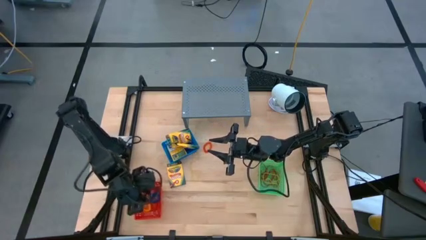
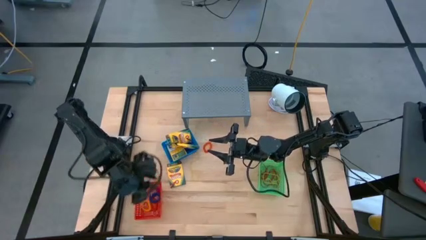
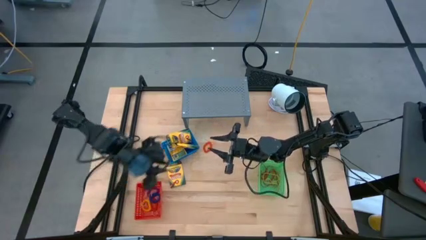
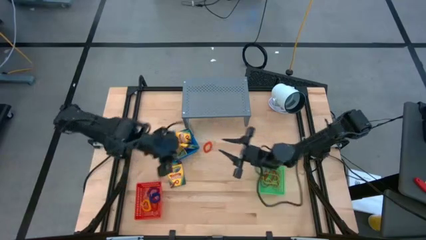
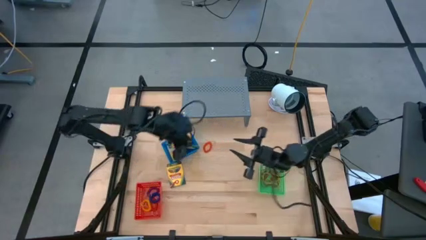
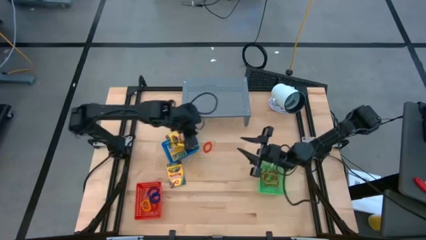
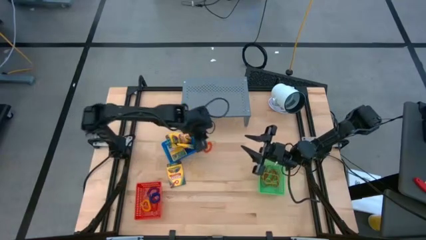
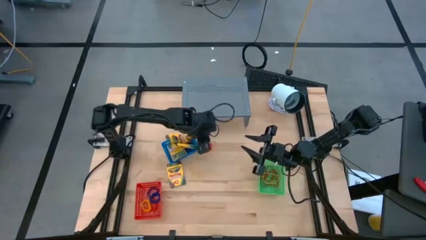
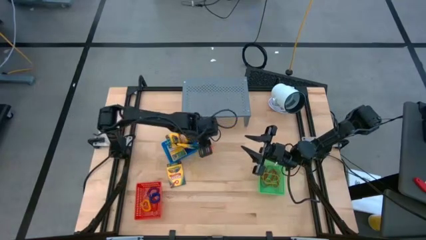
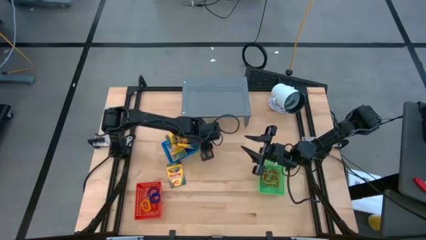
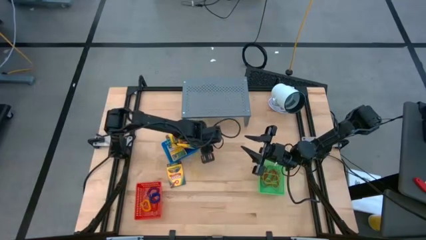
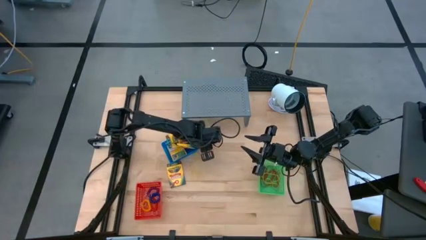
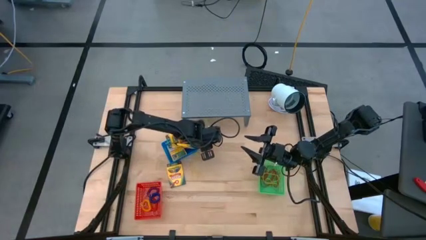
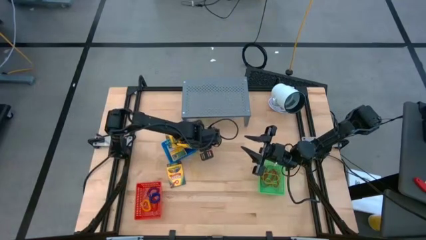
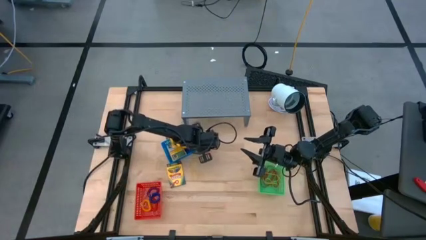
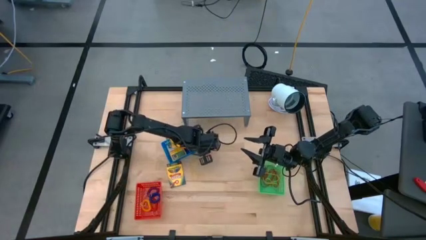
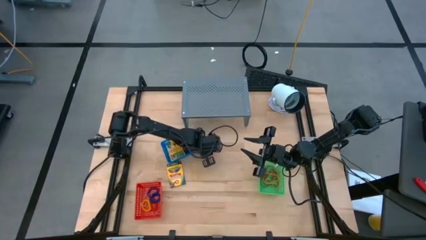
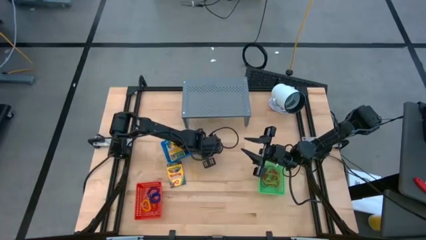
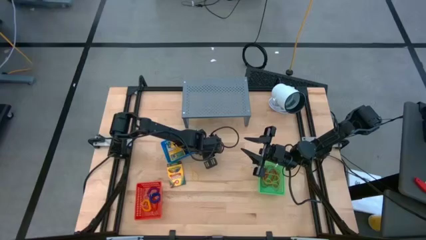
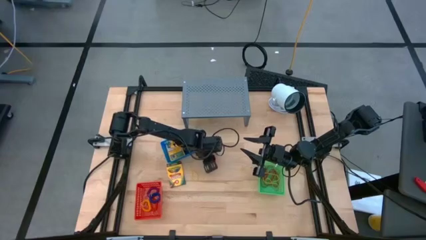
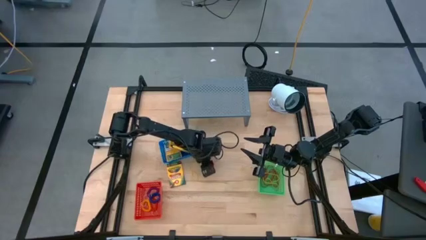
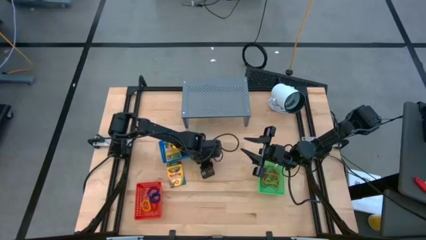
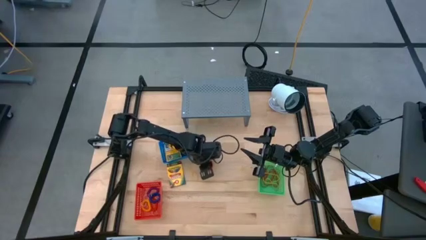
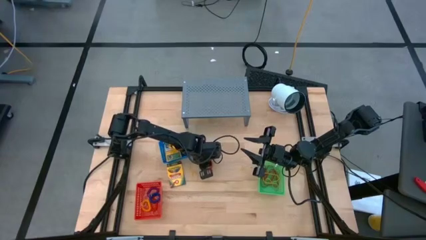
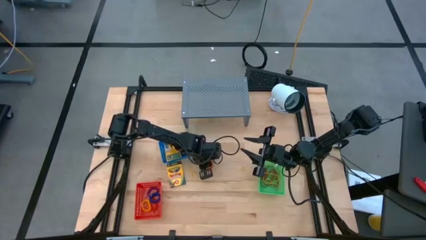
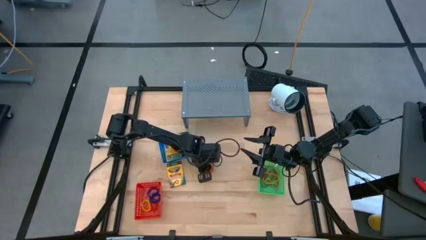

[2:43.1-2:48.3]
Task: Pick & Place Office Desk Supplies
Put the orange spiral keychain into the red bin

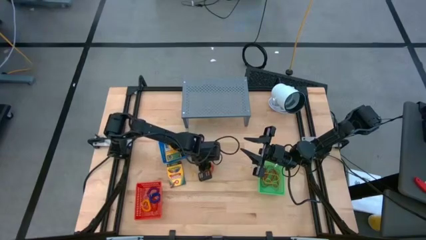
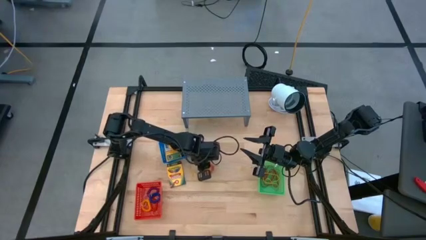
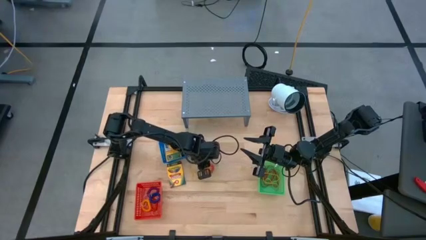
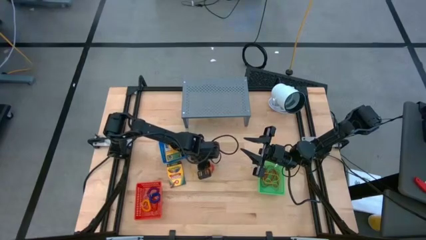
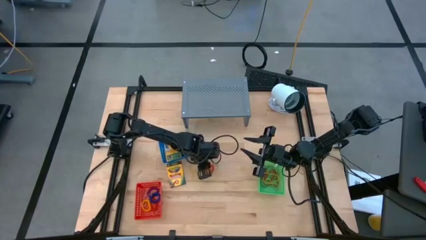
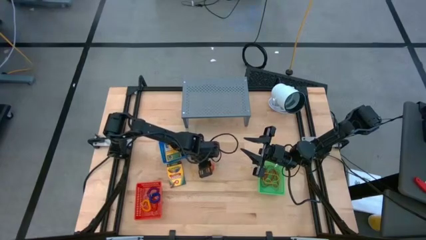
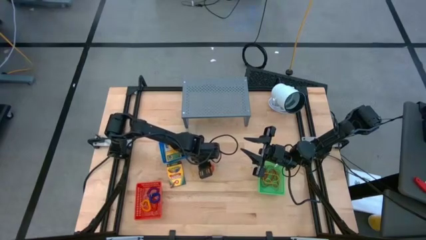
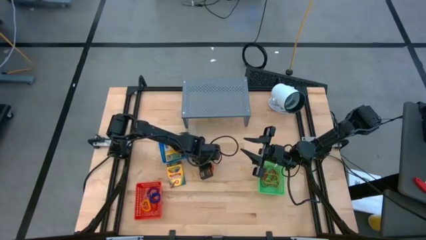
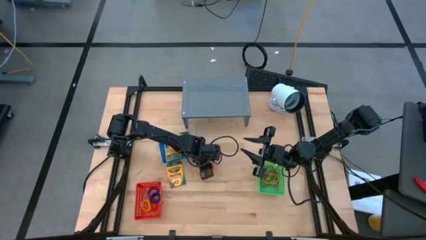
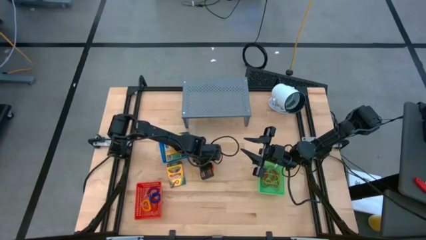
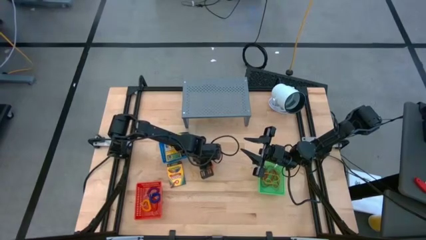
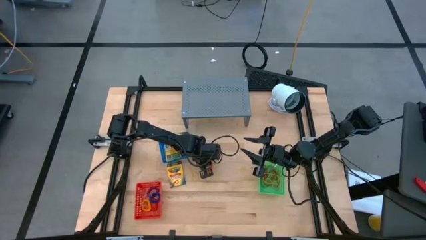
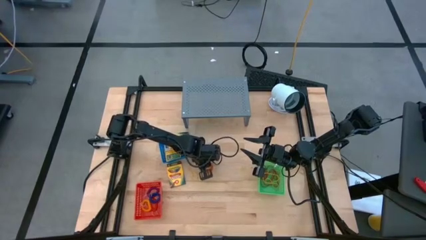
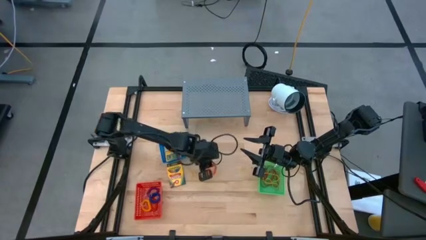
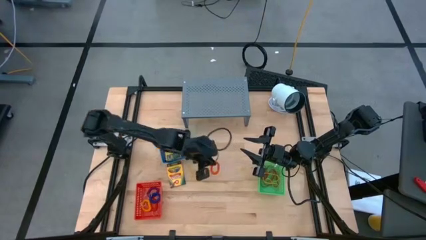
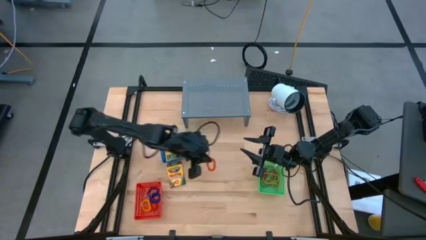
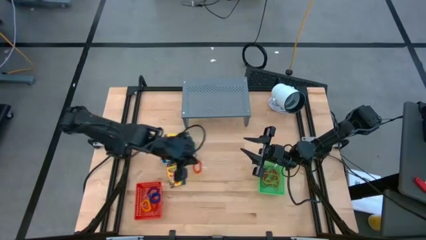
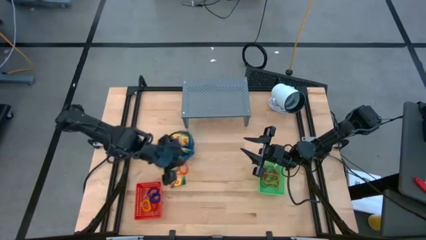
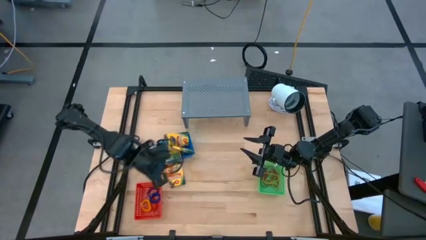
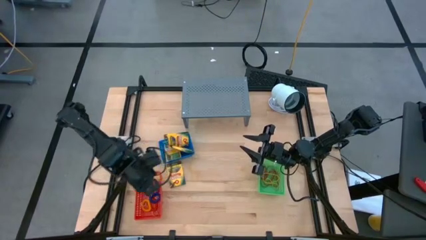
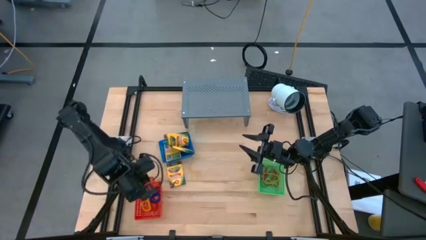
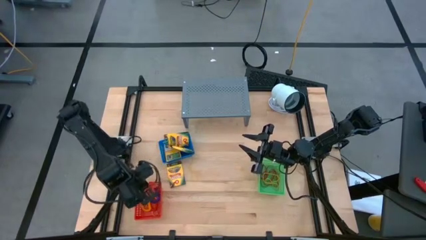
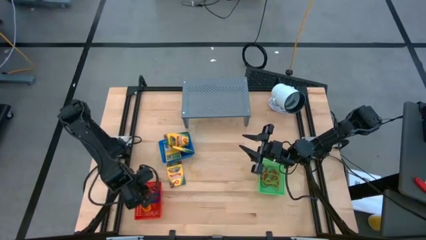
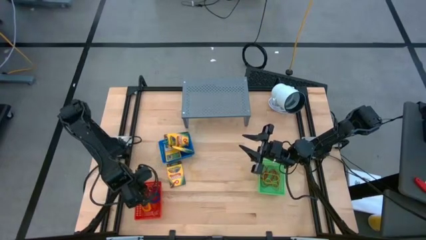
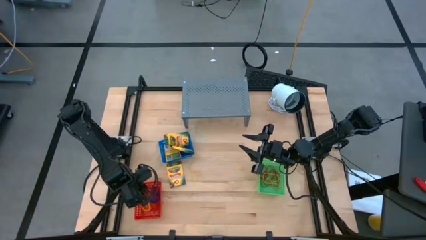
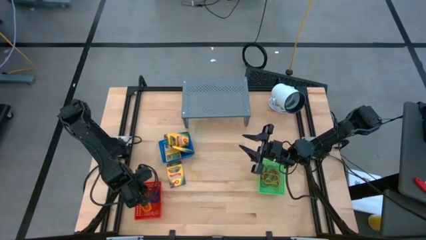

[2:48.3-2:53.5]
Put the orange spiral keychain into the red bin

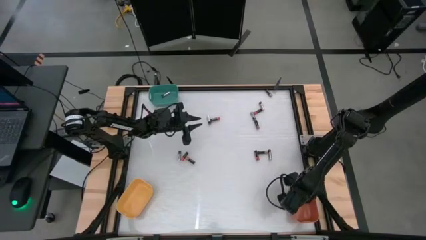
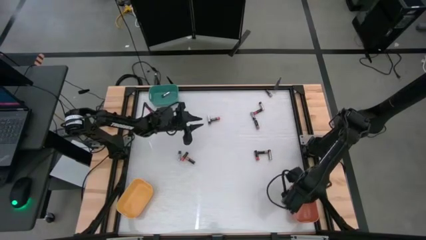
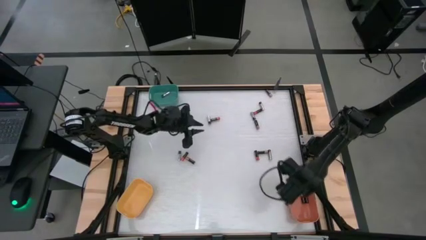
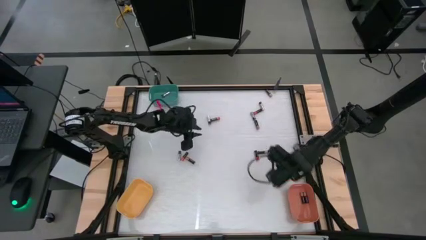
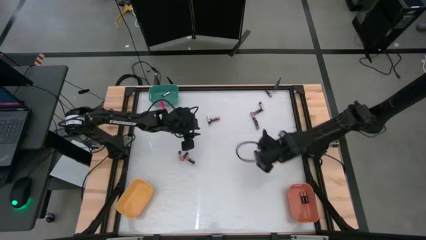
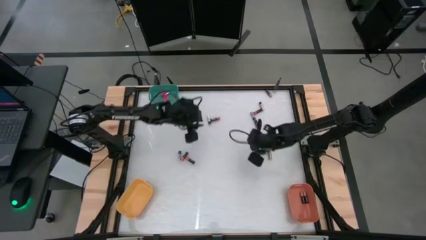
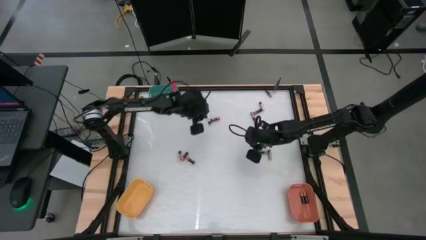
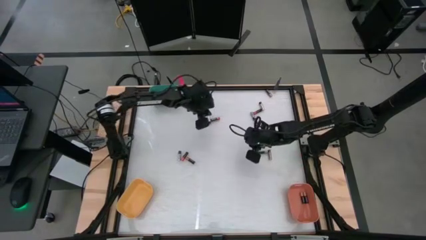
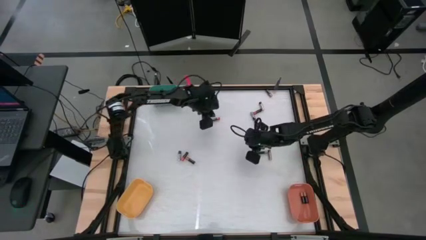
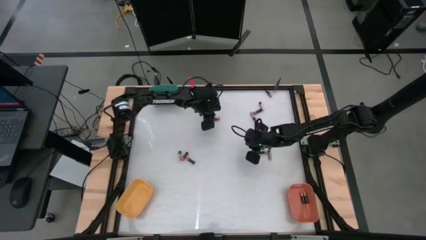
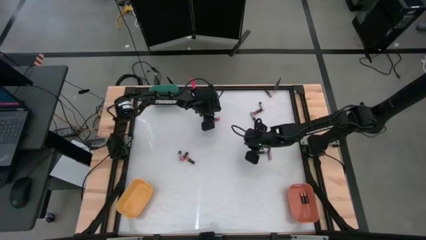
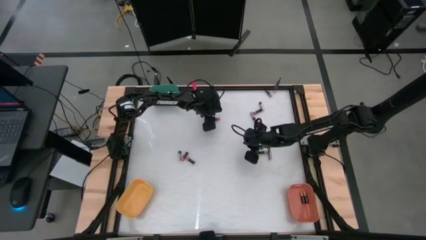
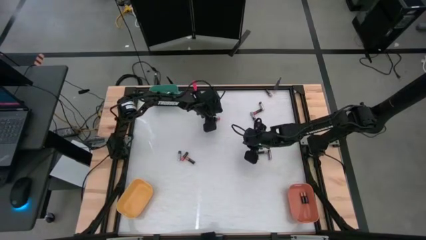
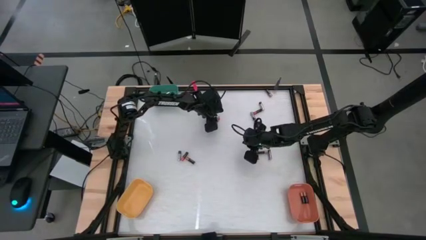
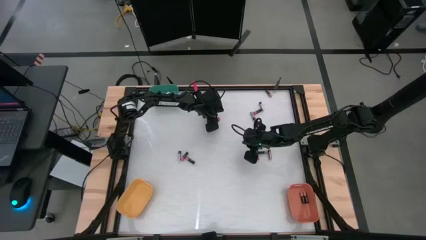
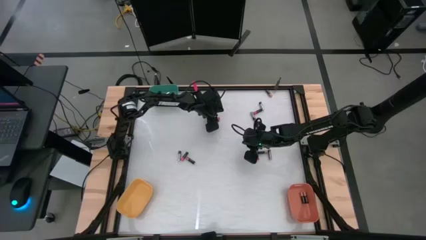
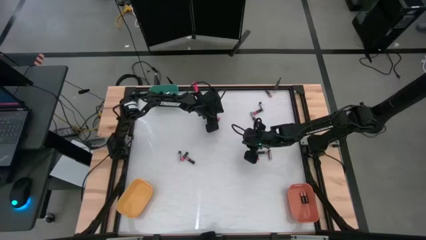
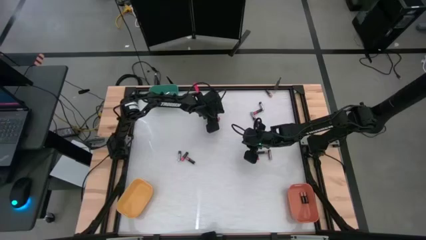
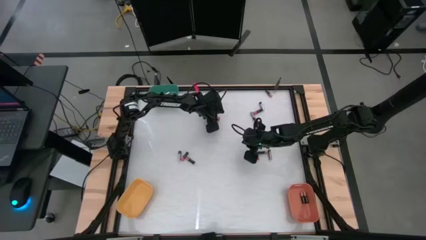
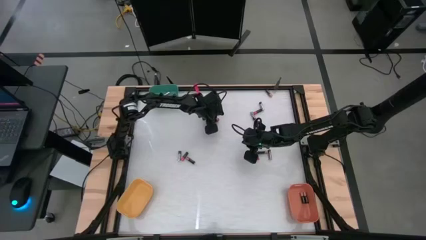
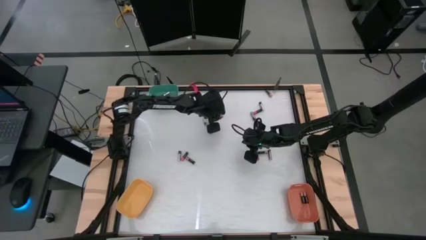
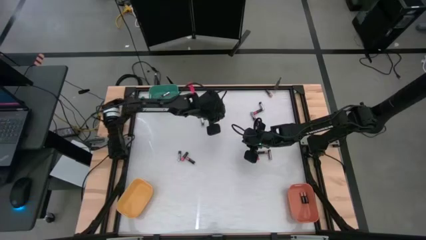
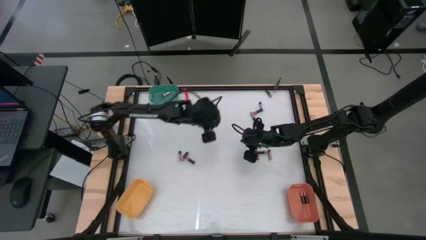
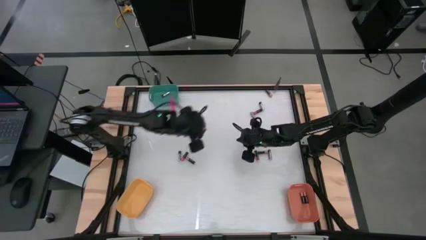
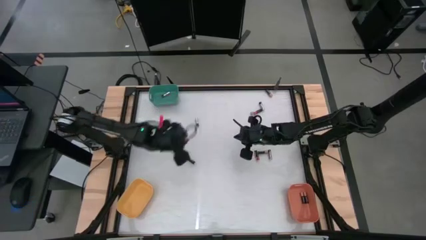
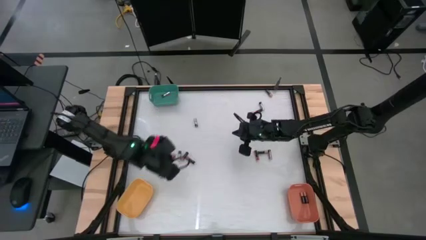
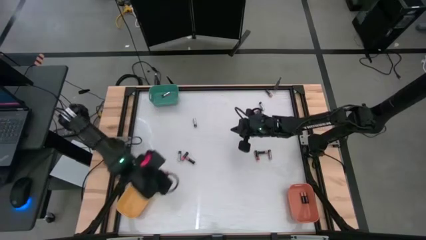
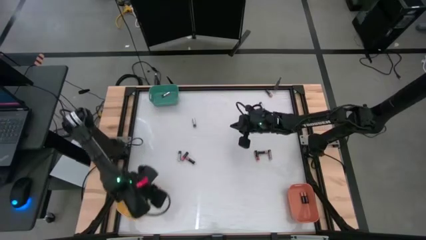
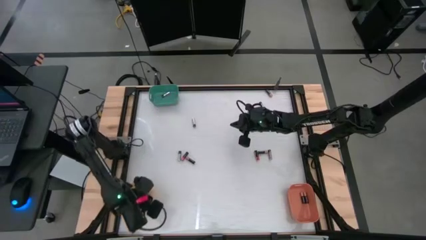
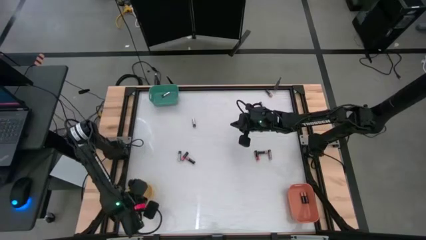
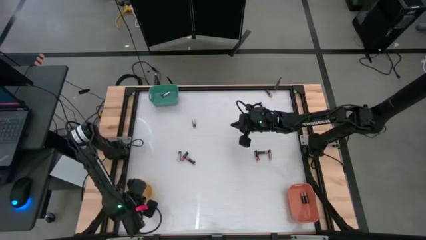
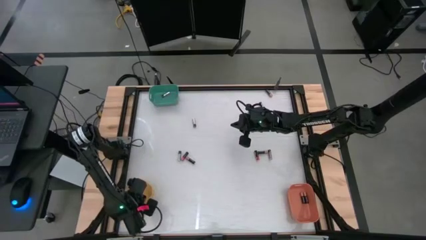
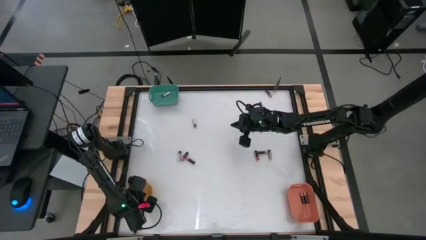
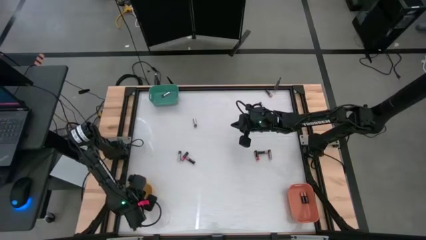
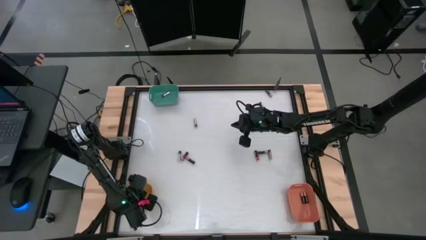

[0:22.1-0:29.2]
Task: Sort batteries
Put the top center red battery into the yellow bin
